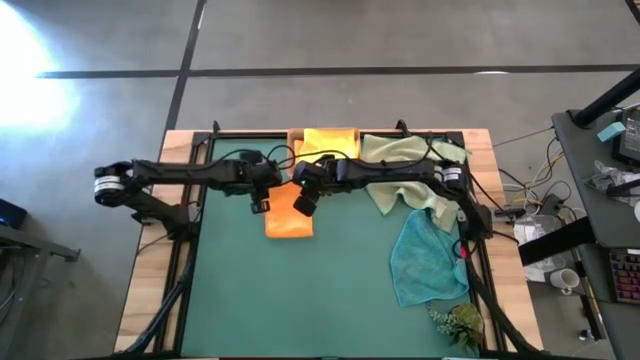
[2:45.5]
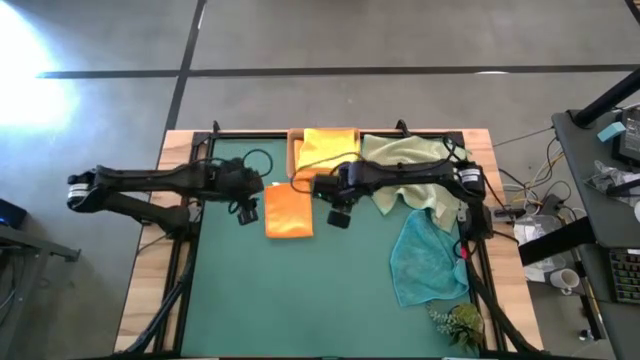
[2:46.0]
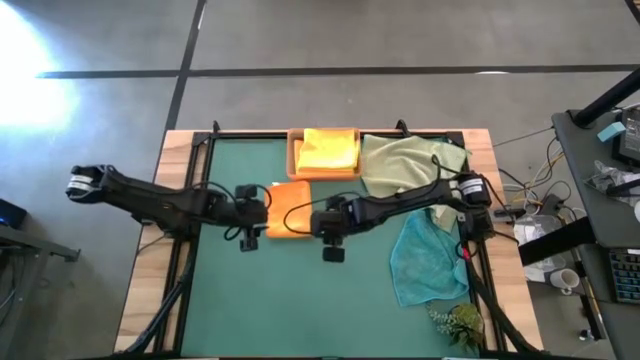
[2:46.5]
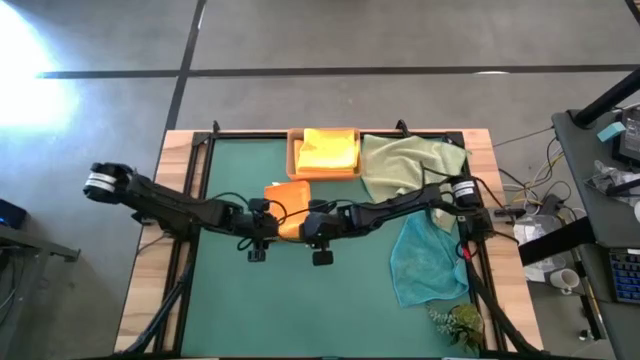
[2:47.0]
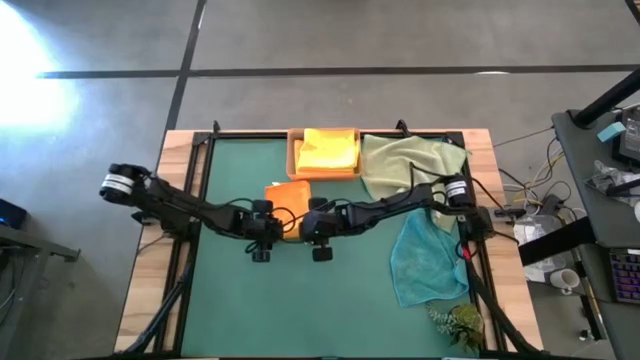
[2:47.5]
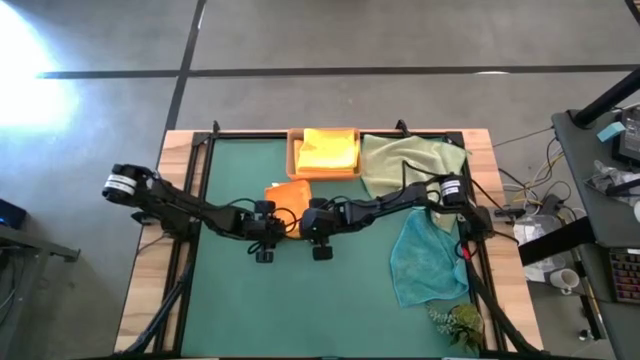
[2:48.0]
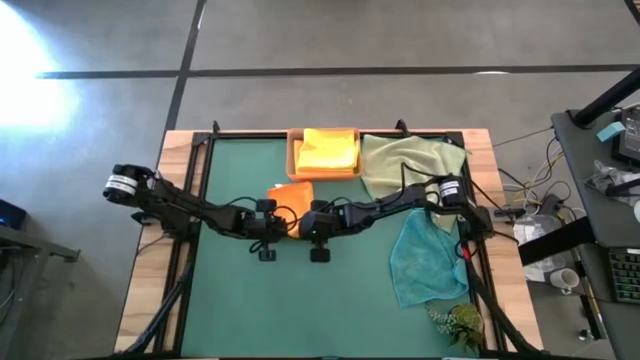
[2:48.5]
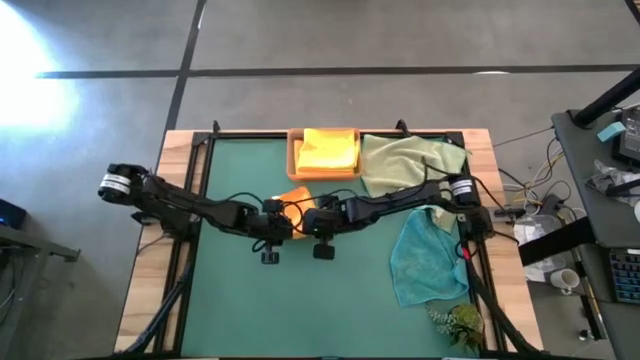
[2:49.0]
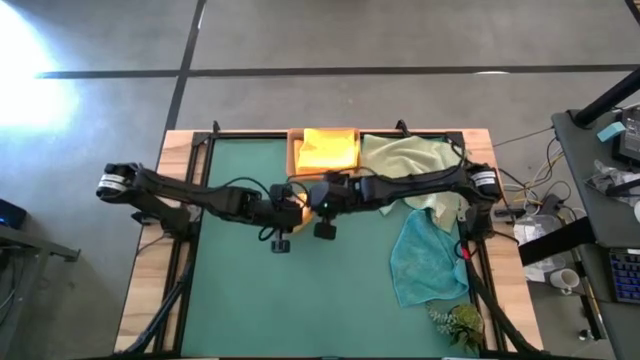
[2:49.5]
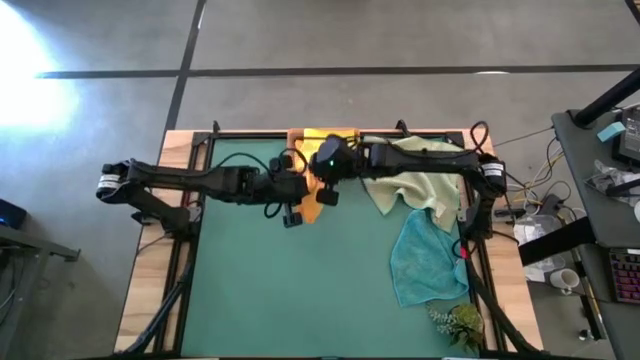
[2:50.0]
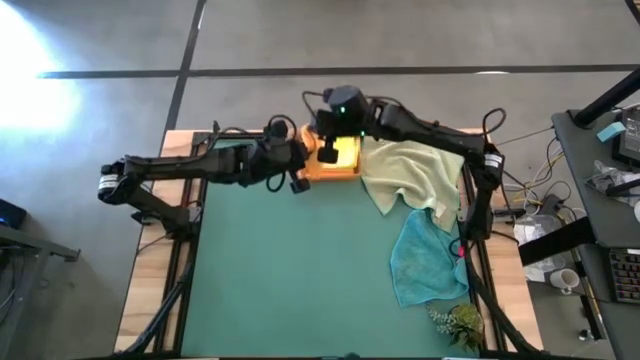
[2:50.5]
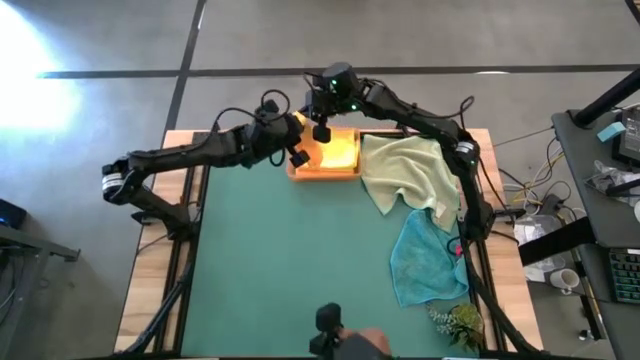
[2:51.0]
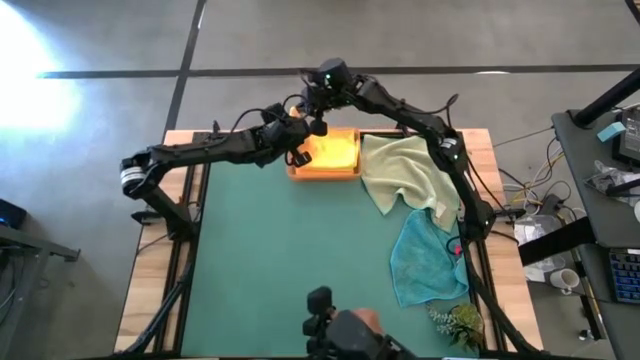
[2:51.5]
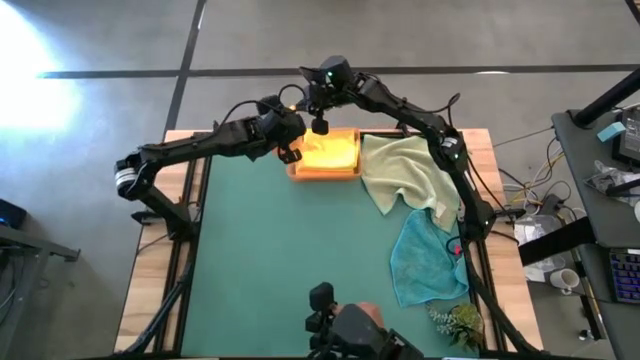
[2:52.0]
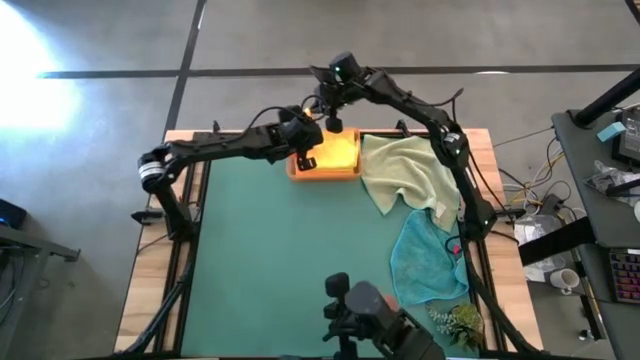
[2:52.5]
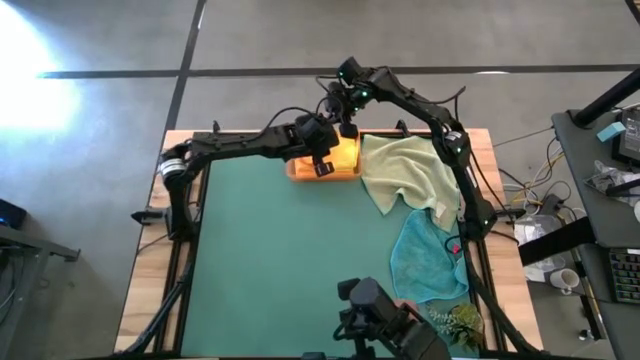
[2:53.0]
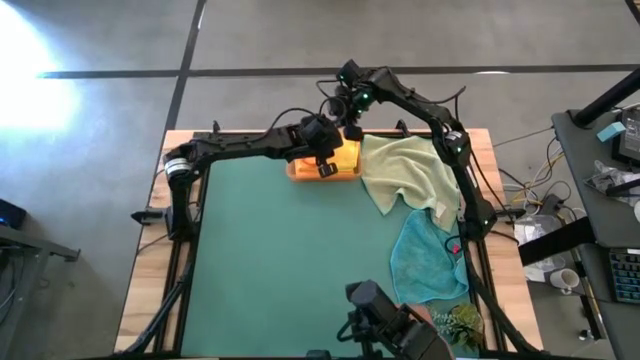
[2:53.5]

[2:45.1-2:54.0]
Task: Fold microfiber towels
Put the orange towel into the orange bin

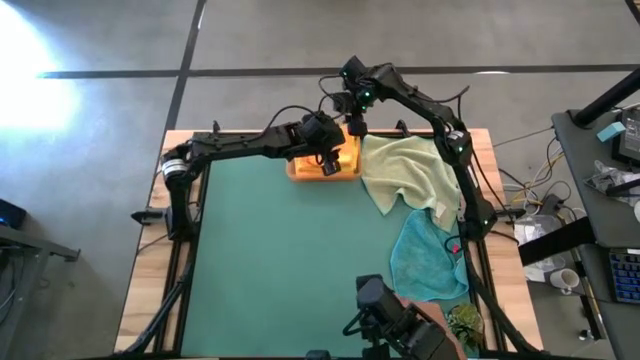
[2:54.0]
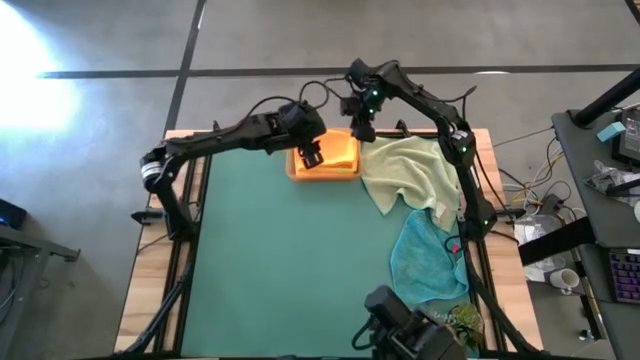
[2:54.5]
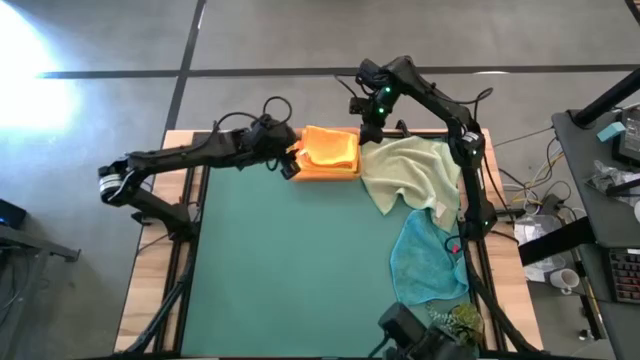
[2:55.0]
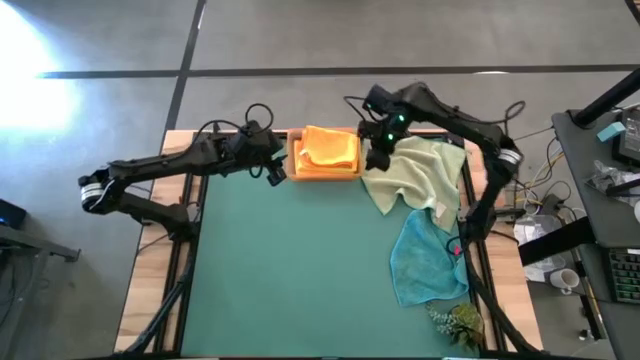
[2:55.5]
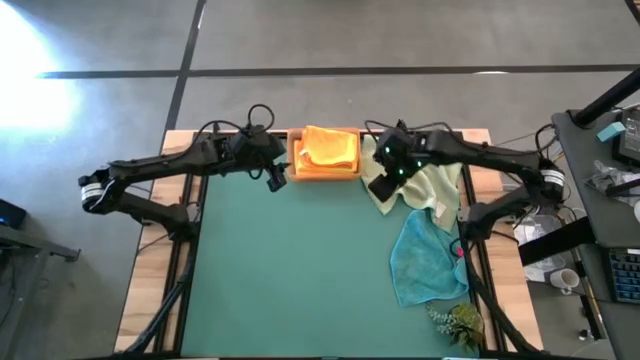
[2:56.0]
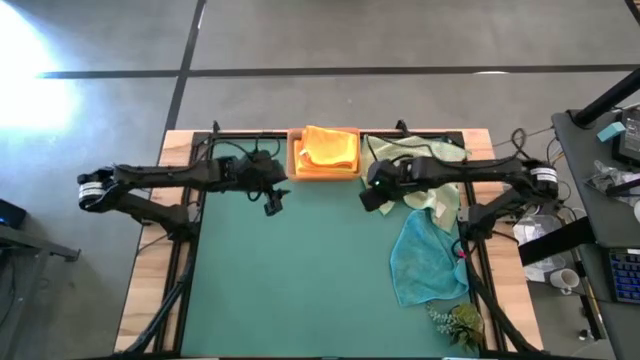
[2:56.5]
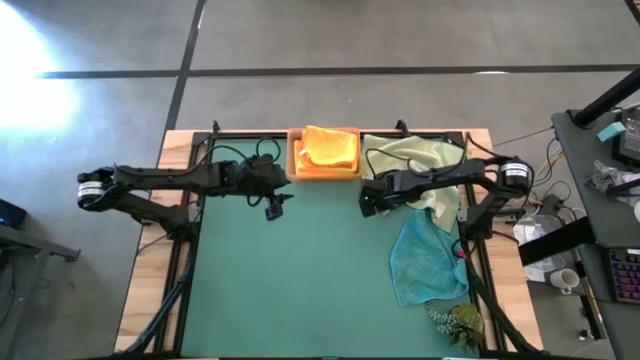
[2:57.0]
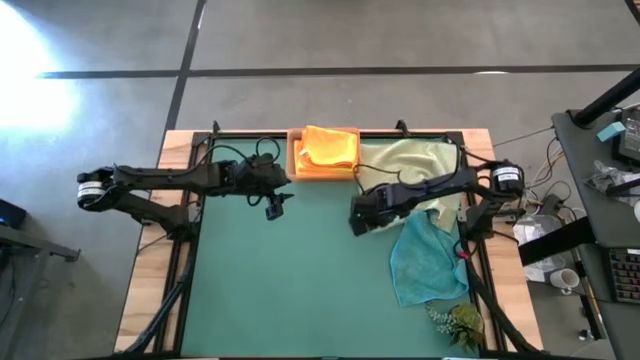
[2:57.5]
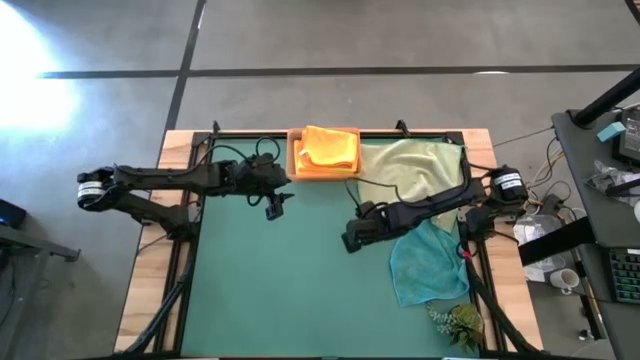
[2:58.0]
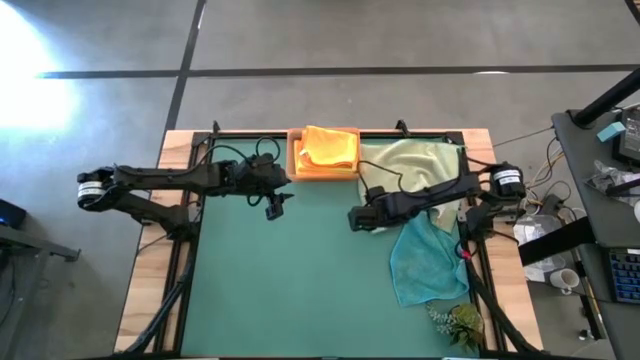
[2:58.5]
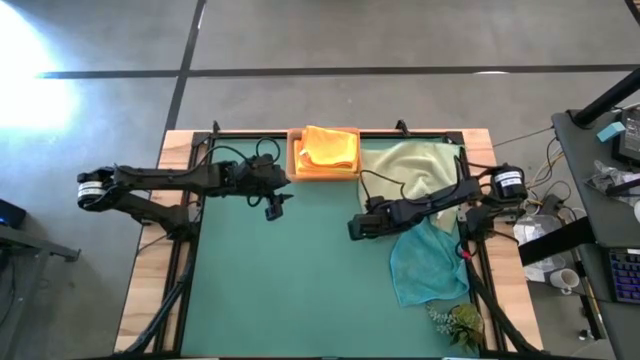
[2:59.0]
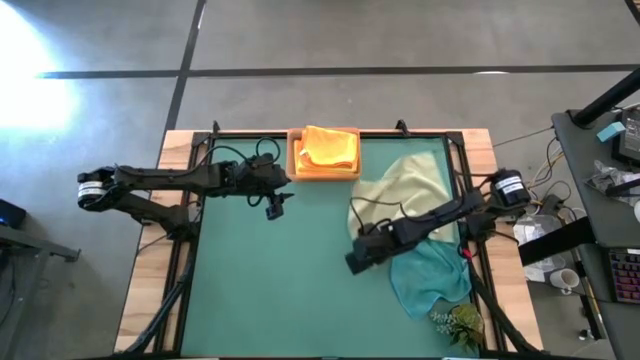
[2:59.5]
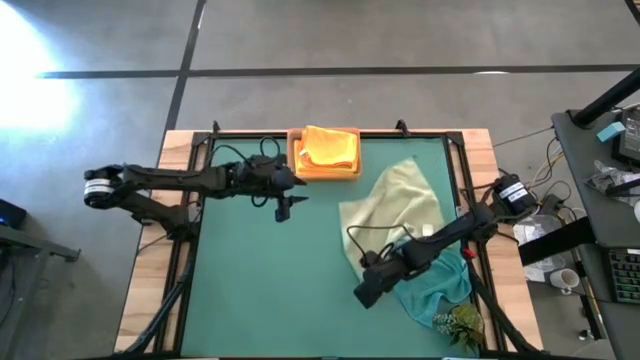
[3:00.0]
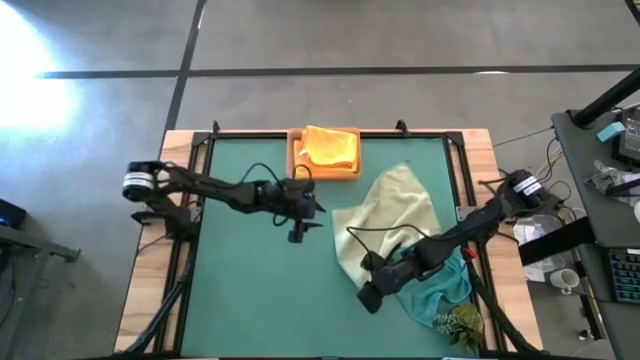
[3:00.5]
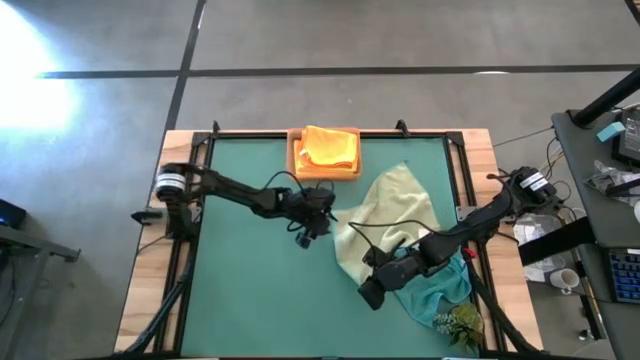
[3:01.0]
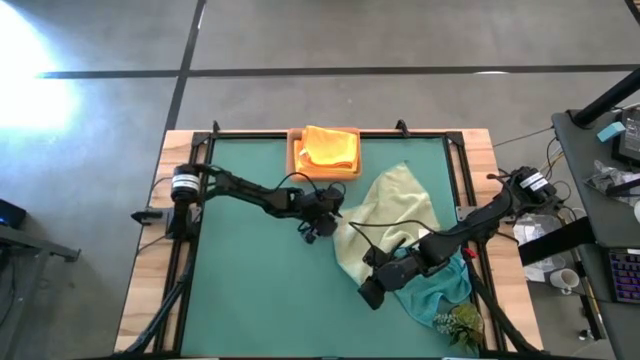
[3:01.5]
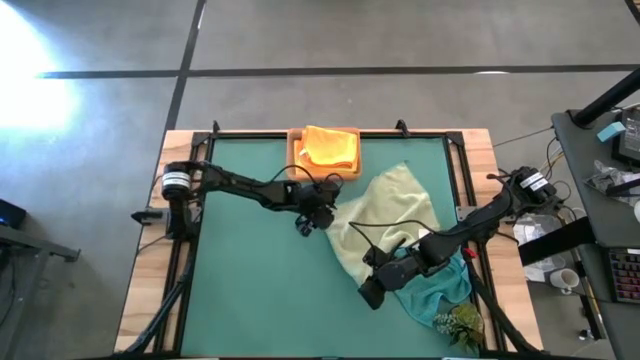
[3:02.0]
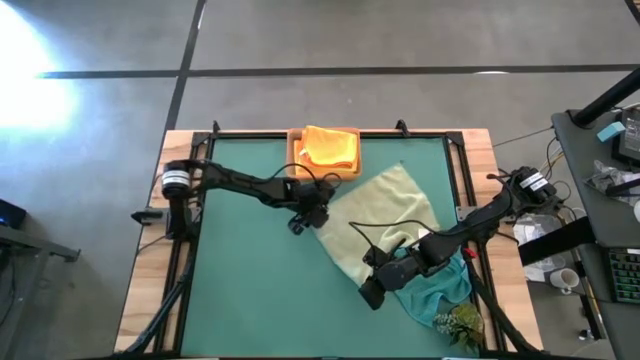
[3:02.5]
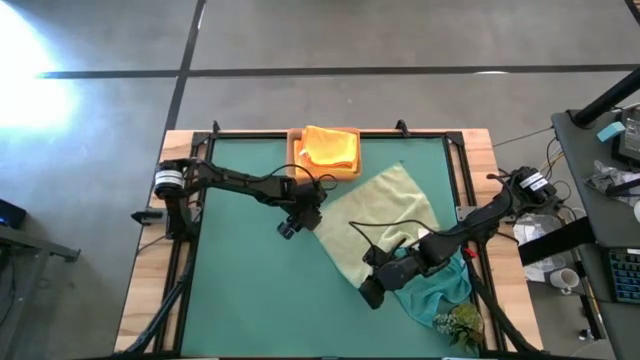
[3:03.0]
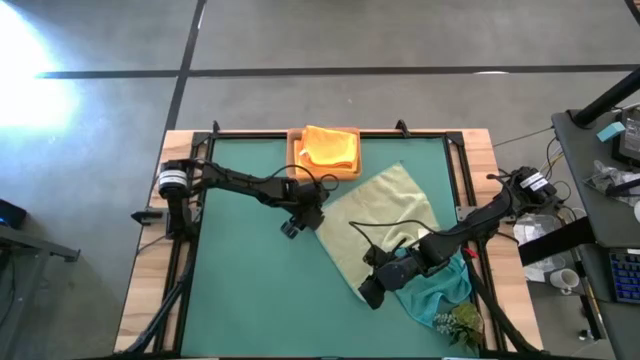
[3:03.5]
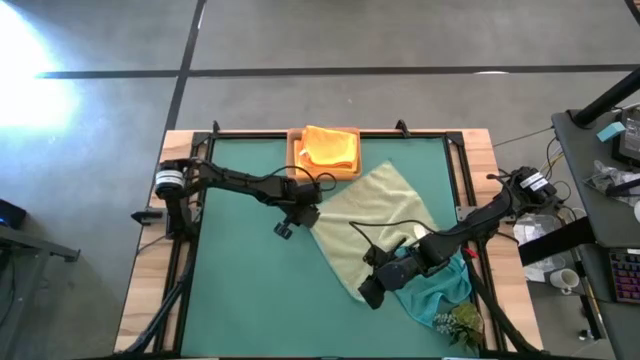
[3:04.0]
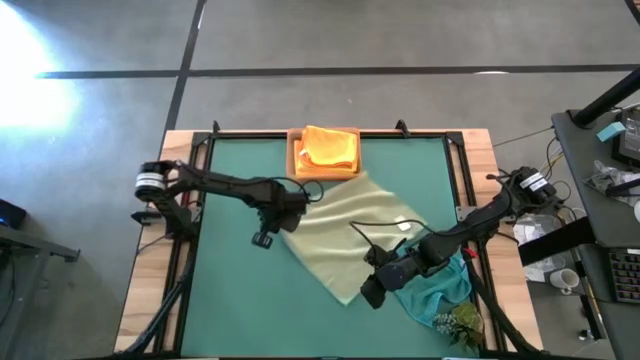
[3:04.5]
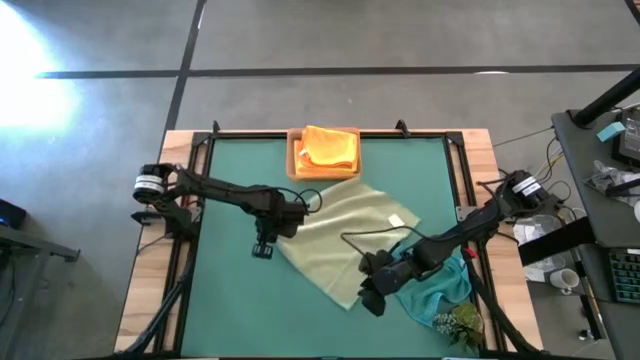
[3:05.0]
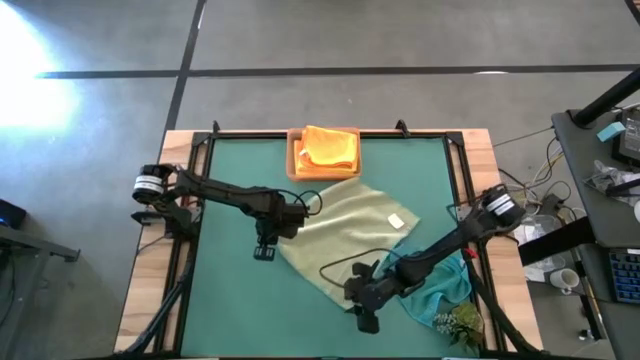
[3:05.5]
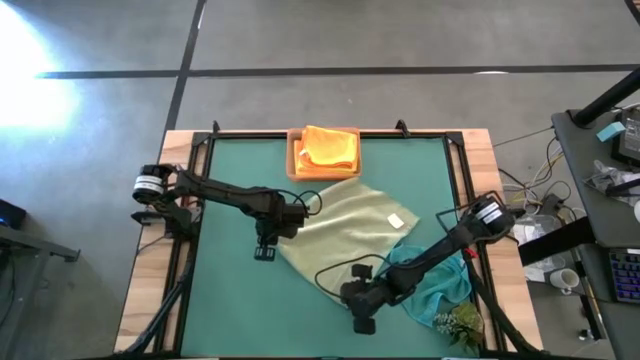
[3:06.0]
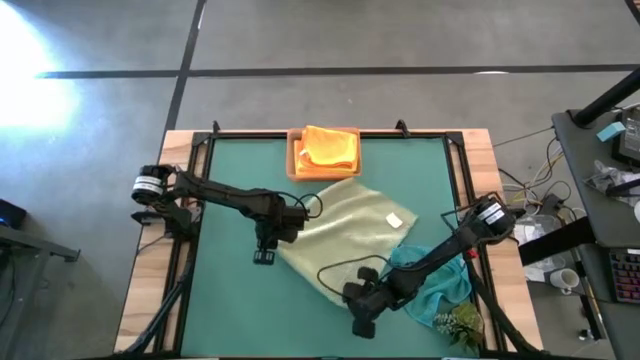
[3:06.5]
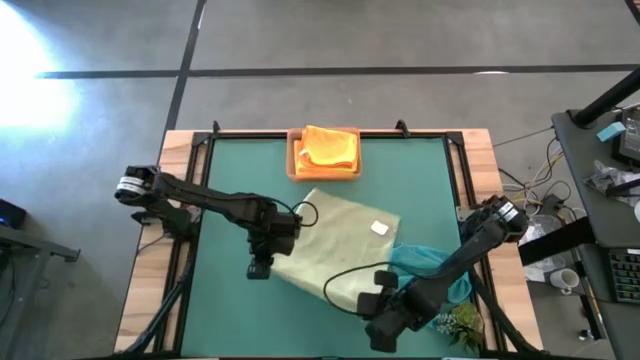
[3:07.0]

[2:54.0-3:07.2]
Fold the gray towel
